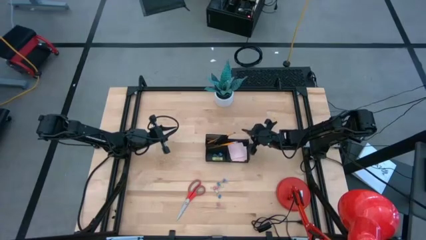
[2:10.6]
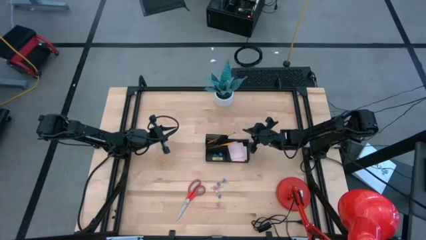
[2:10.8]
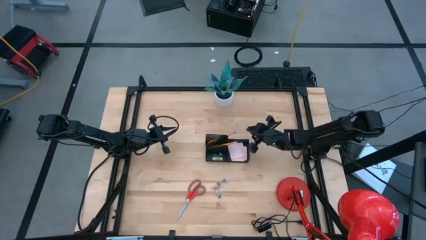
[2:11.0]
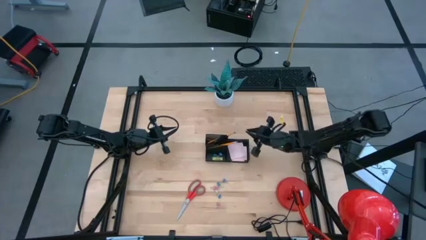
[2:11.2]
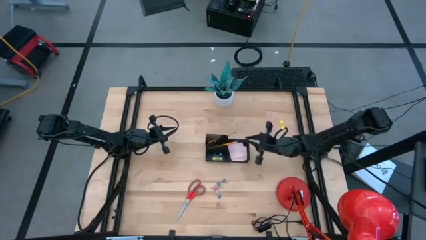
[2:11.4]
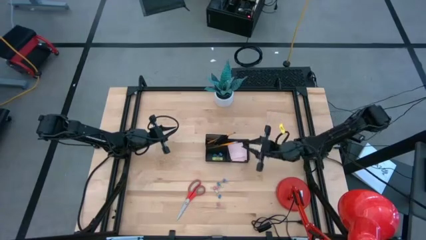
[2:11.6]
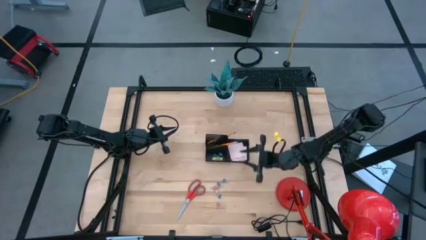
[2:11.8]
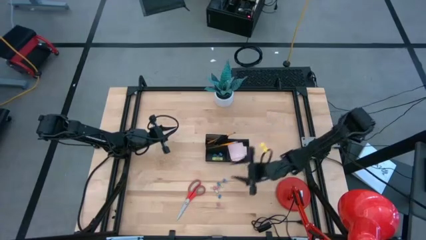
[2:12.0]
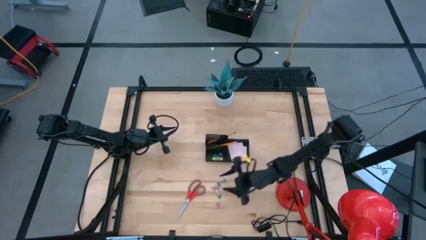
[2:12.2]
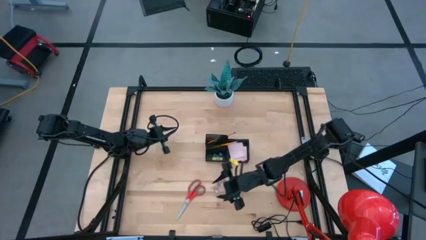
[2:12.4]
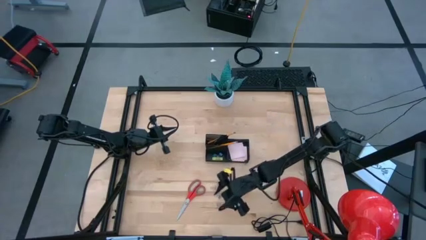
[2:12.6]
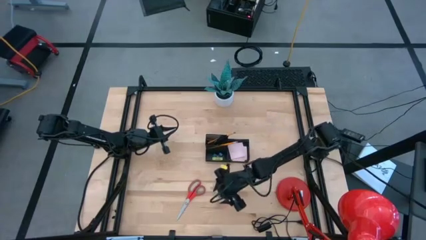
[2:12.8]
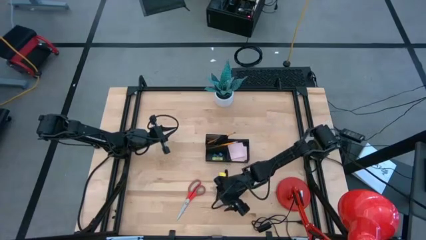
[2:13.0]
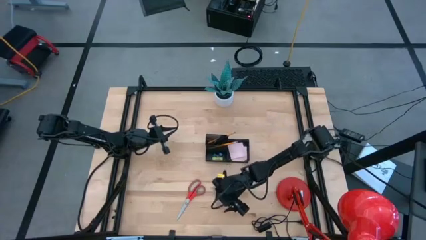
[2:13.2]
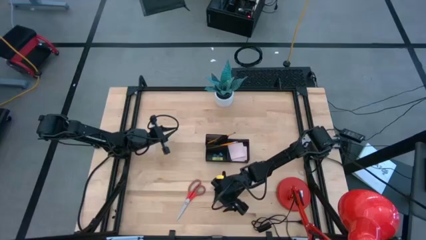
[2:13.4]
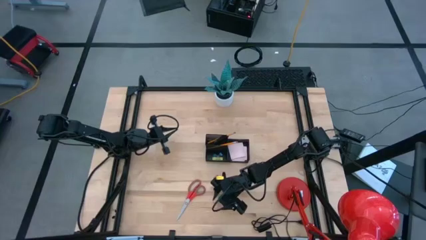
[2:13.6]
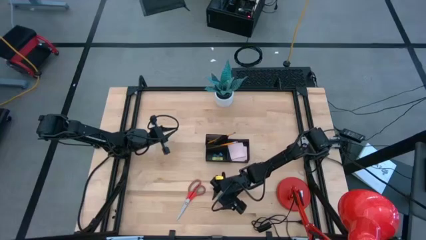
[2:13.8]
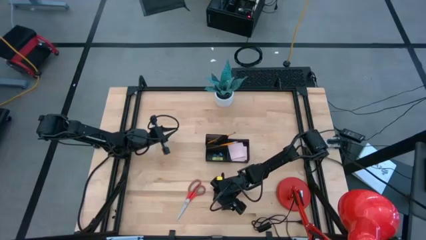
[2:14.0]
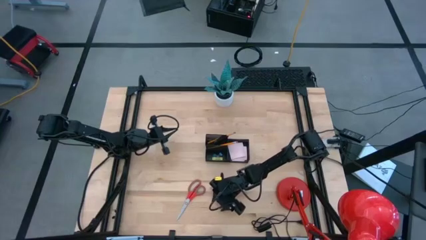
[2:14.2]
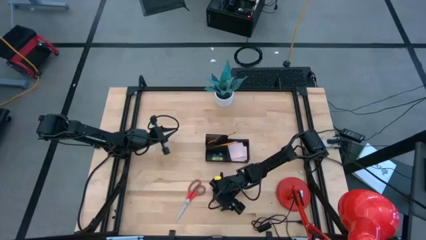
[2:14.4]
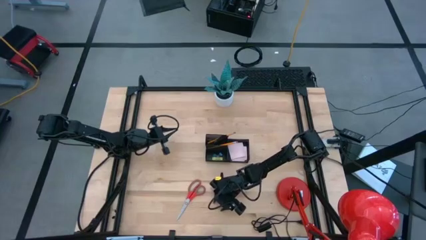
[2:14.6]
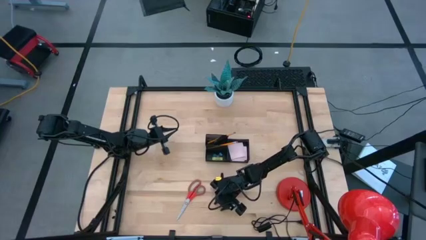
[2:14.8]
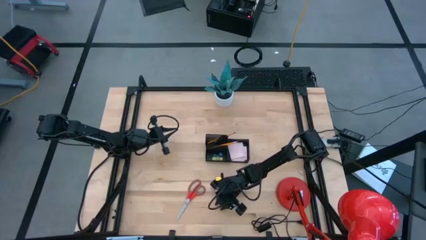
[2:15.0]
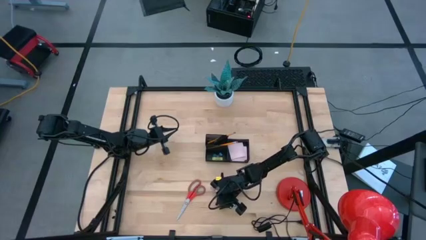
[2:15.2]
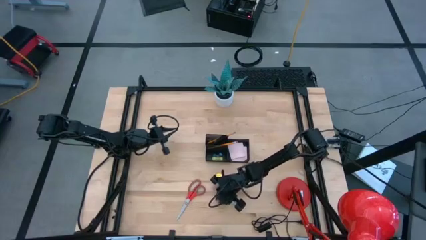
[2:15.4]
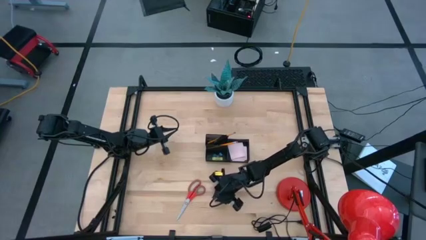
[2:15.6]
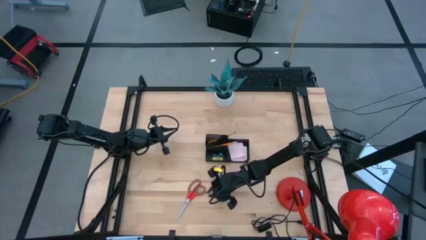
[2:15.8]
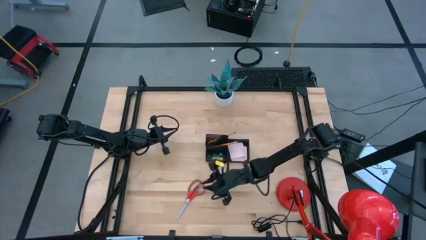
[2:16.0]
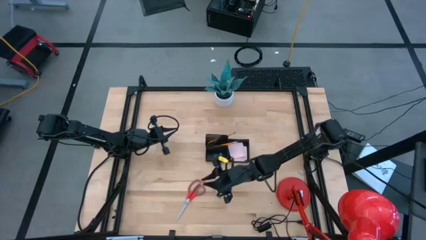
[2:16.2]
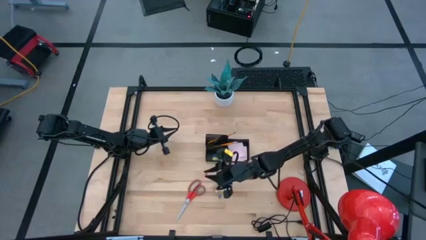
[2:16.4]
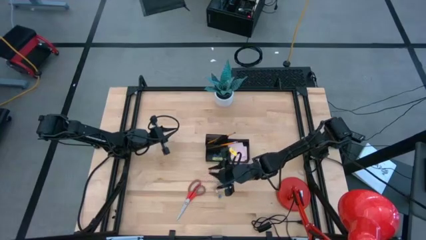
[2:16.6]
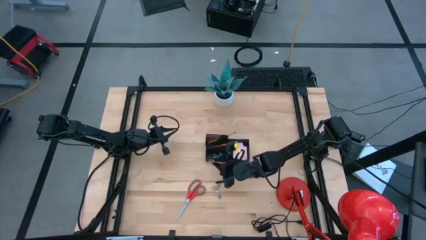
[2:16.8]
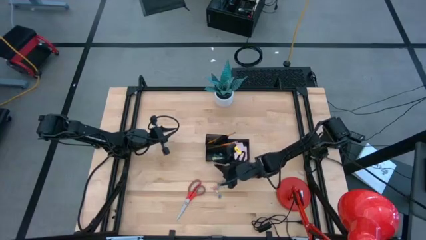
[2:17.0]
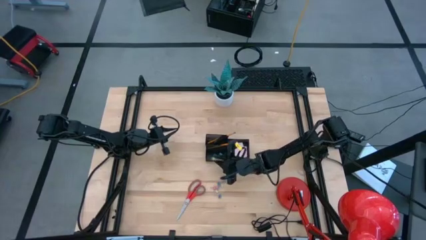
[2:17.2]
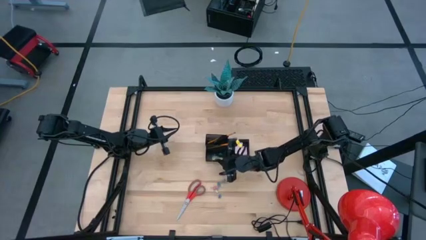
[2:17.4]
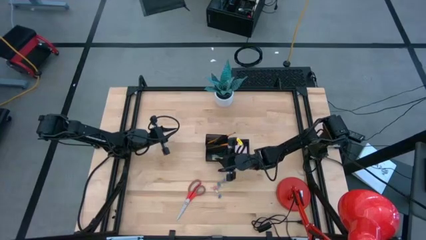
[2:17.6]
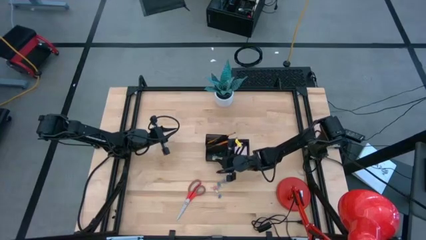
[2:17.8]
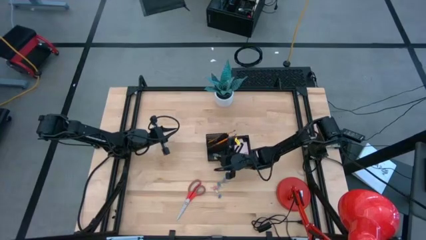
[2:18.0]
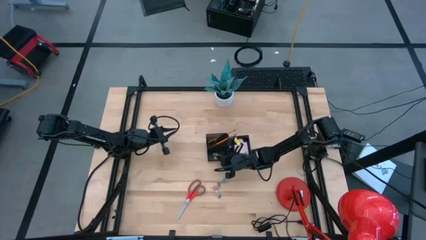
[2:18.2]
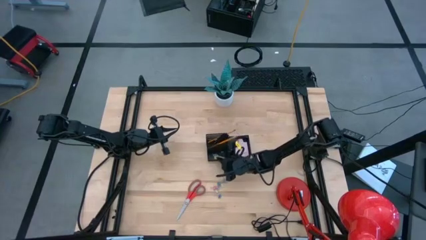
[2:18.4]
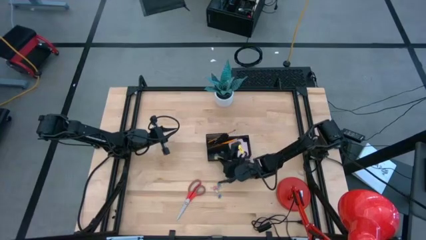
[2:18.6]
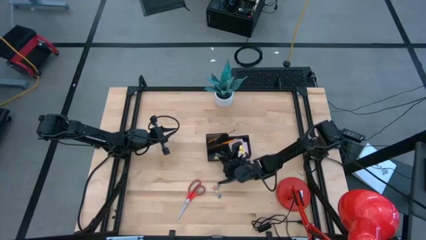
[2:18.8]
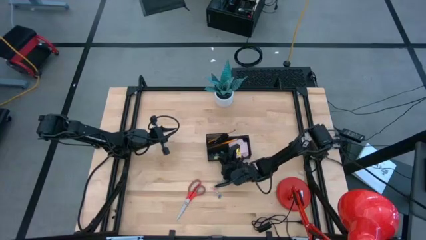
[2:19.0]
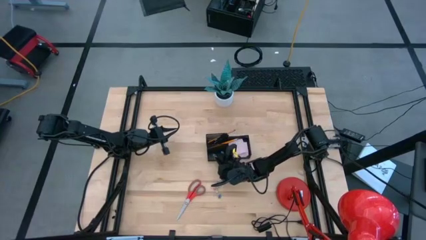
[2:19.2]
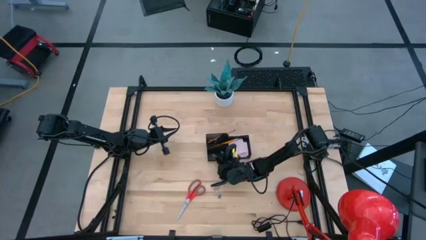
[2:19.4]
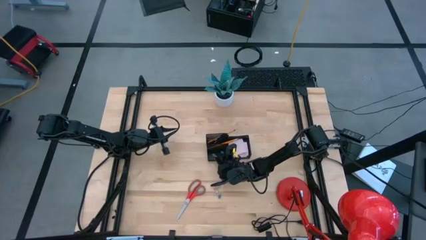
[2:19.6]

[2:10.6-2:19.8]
Task: Pick and place office supplies into organizer
Put the pink binder clip into the desk organizer

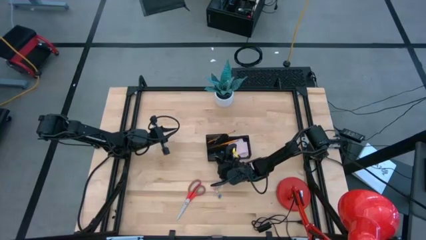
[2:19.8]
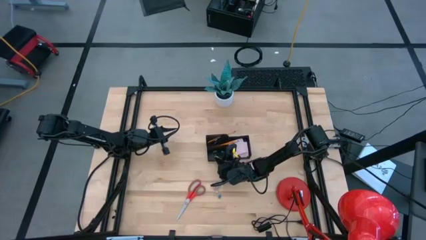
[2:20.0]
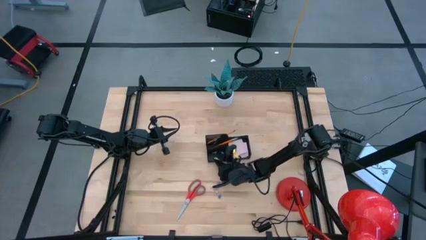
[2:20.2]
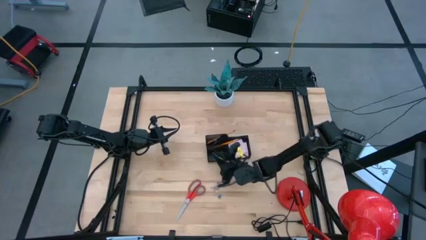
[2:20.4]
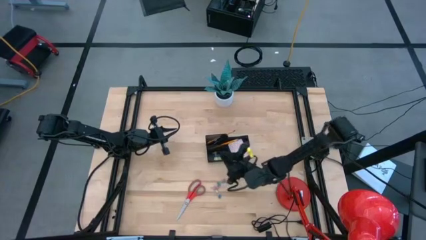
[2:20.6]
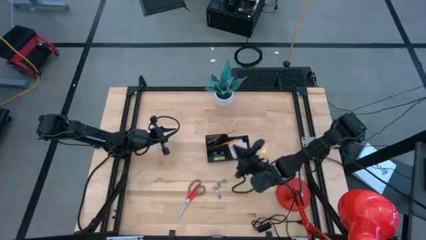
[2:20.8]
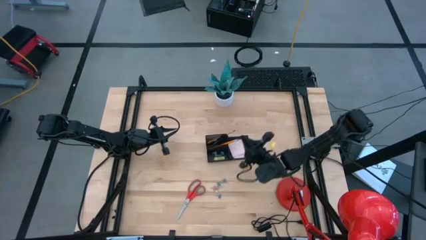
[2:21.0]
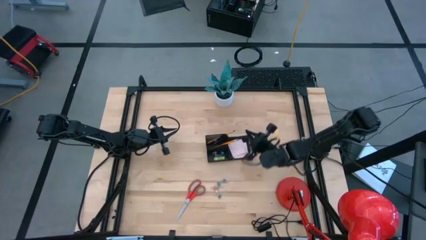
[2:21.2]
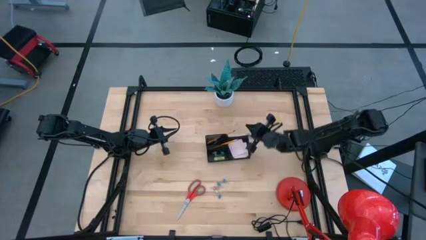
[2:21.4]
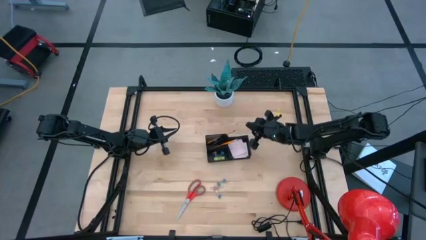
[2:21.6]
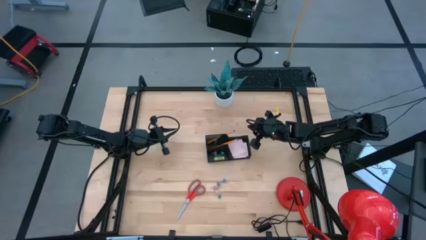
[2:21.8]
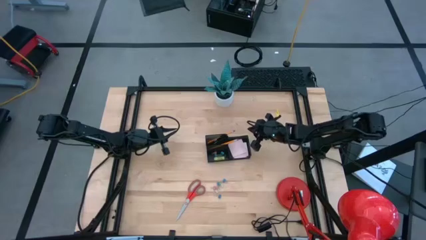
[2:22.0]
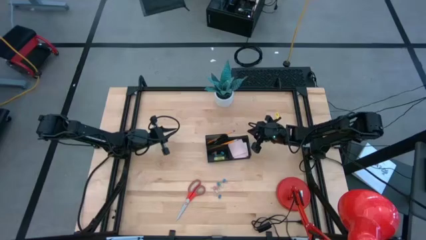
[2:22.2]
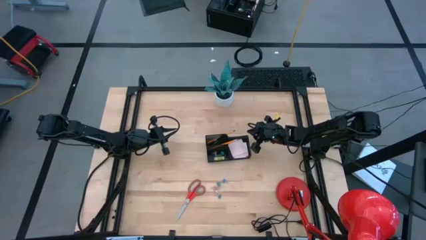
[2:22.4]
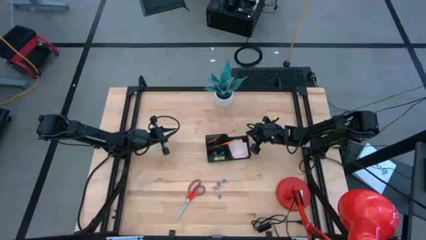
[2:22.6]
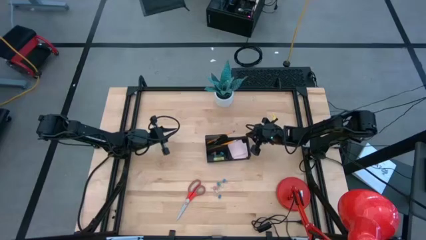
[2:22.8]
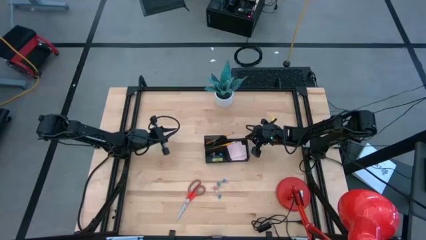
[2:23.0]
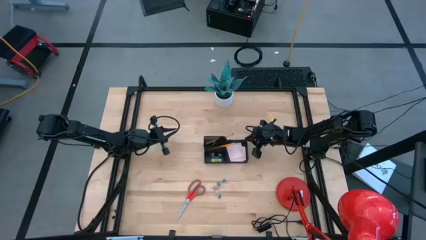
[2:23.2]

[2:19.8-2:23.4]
Adjust the desk organizer

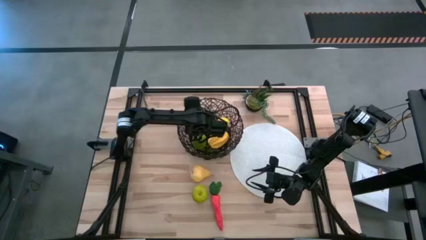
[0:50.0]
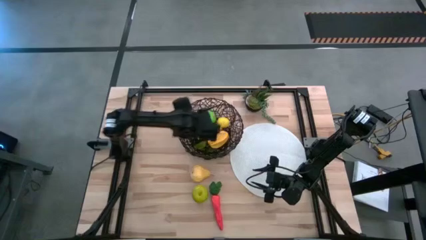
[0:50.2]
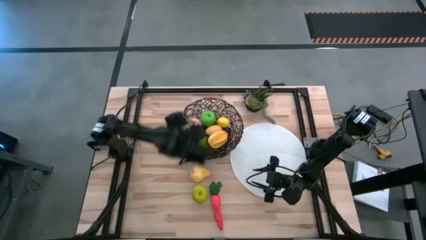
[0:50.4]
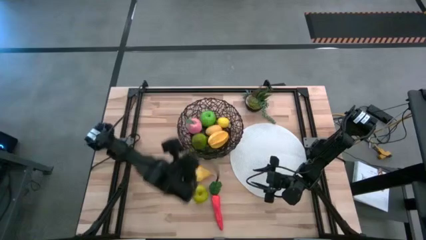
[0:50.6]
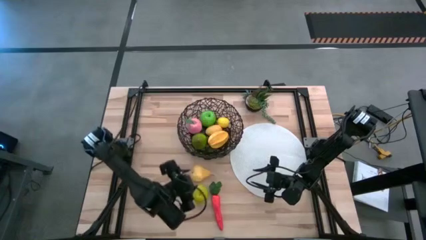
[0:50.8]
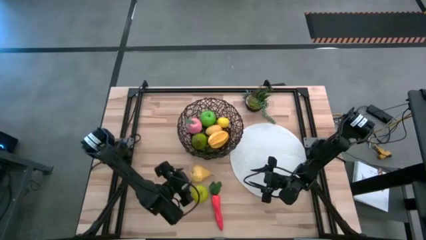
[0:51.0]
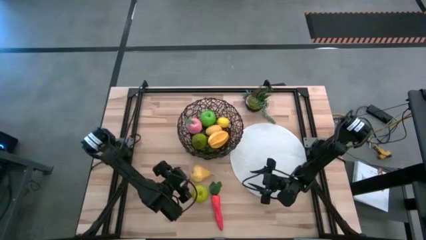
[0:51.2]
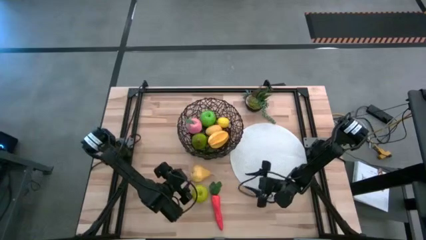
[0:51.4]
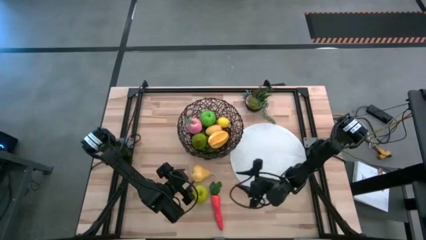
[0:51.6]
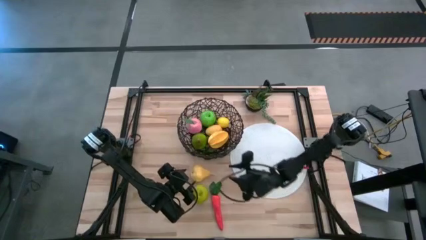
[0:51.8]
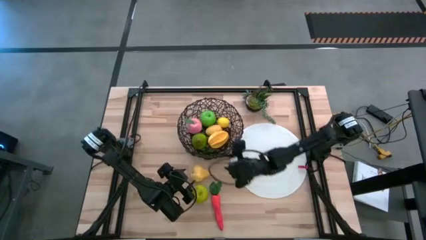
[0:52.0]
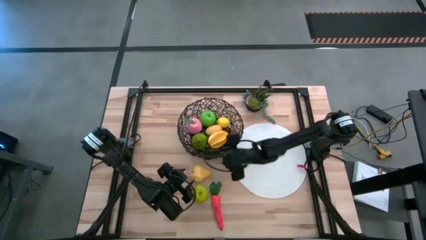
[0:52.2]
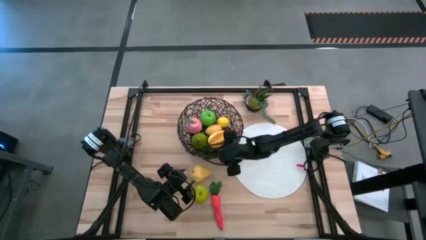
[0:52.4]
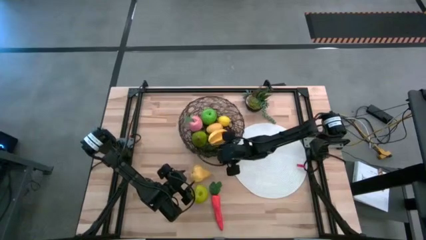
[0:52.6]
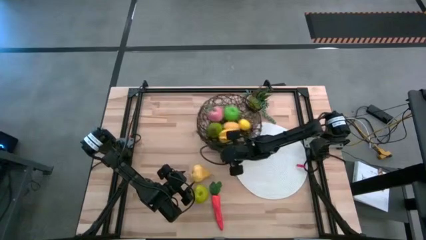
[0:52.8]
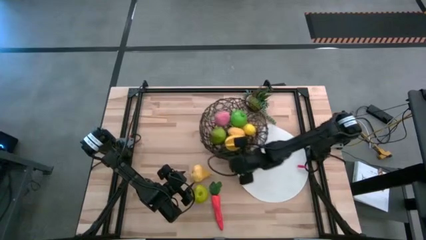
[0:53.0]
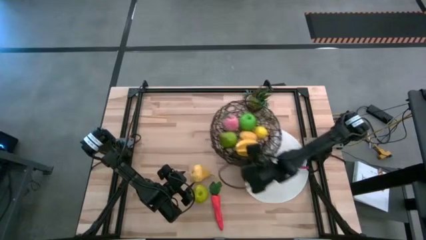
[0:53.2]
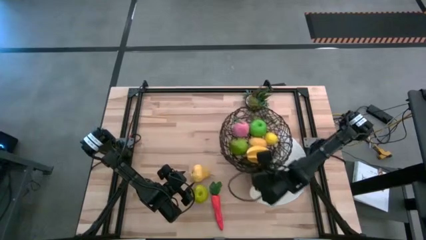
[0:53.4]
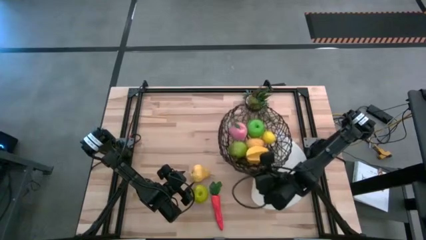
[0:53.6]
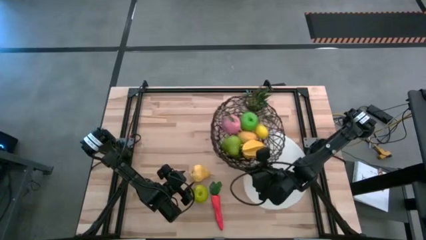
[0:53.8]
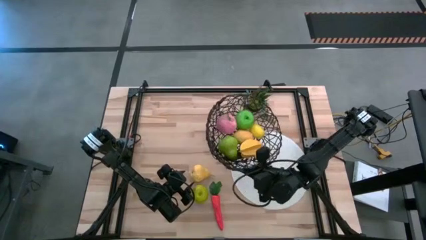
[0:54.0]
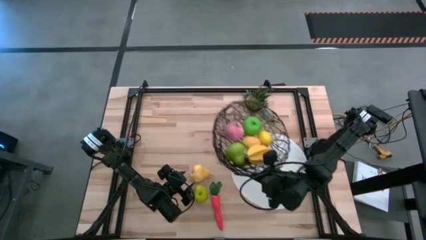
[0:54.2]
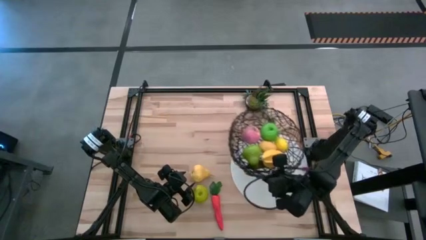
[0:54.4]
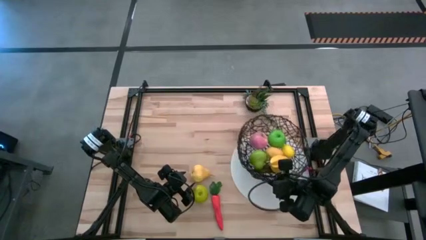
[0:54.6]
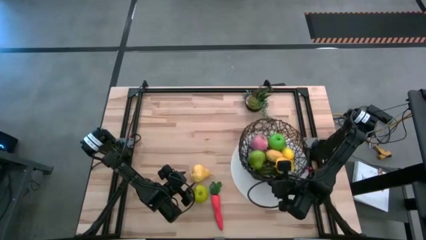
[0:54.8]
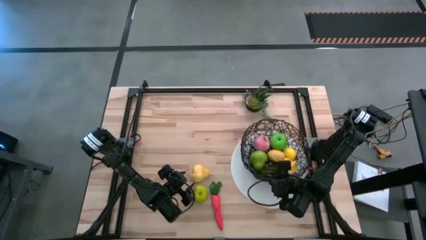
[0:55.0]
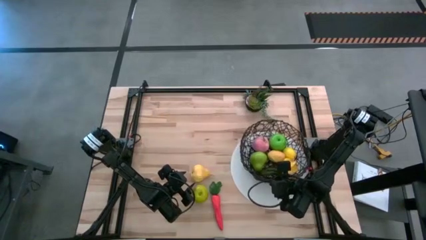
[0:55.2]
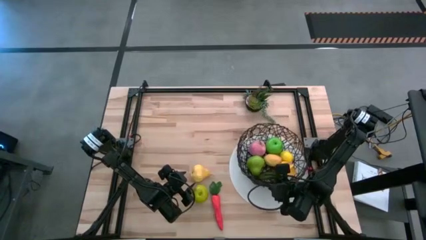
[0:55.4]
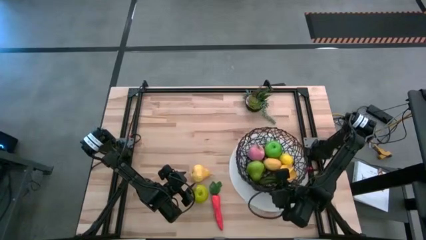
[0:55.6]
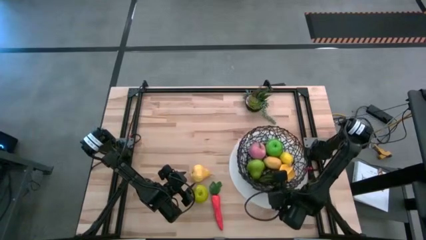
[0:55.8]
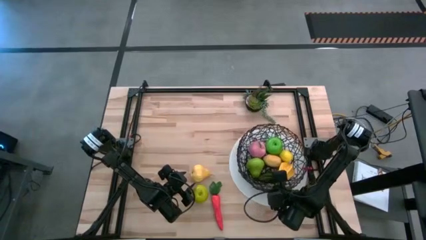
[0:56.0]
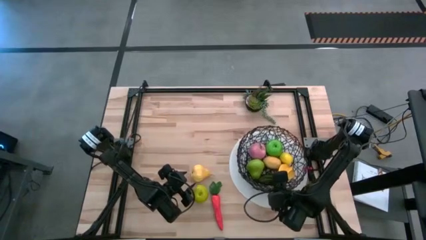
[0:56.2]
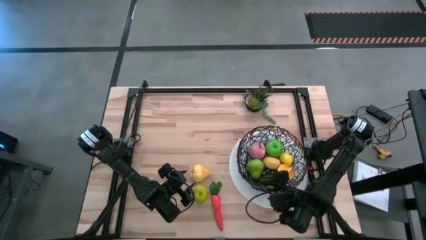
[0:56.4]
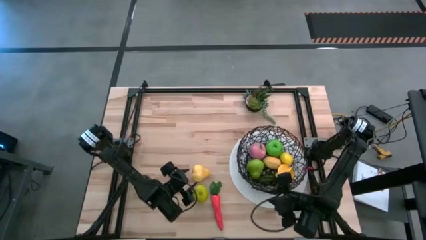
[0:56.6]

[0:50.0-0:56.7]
Task: Build produce basket
Move the wire basket on the white tablemat
